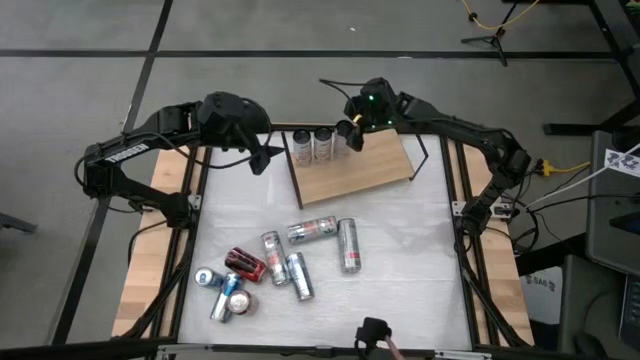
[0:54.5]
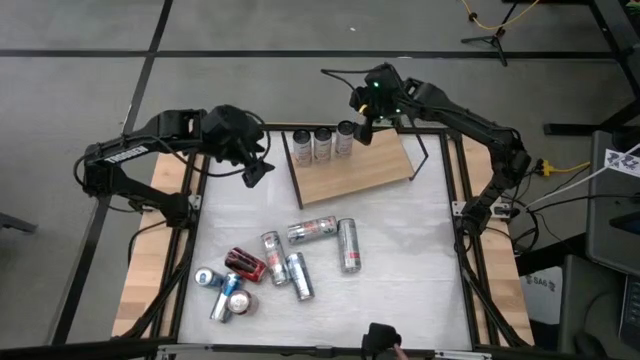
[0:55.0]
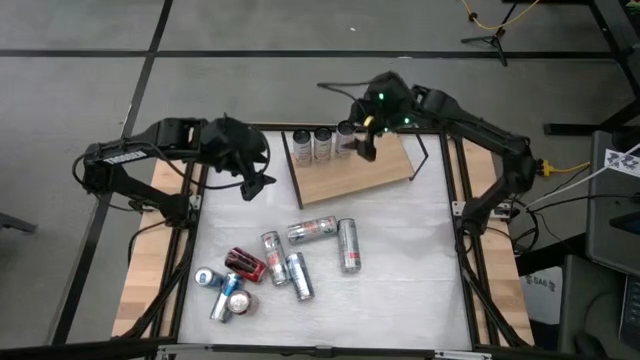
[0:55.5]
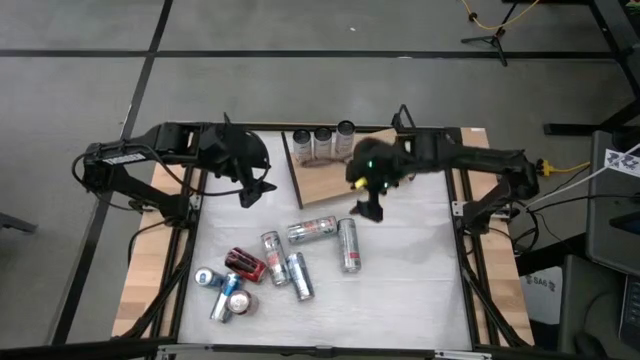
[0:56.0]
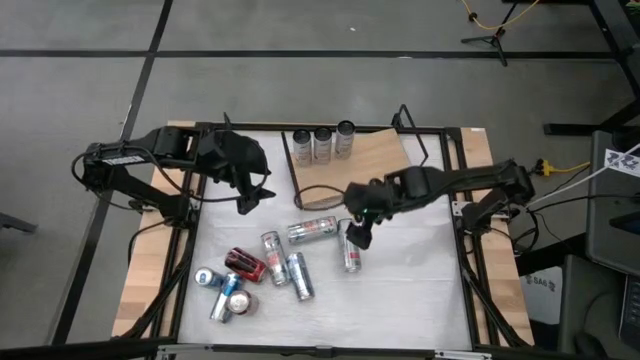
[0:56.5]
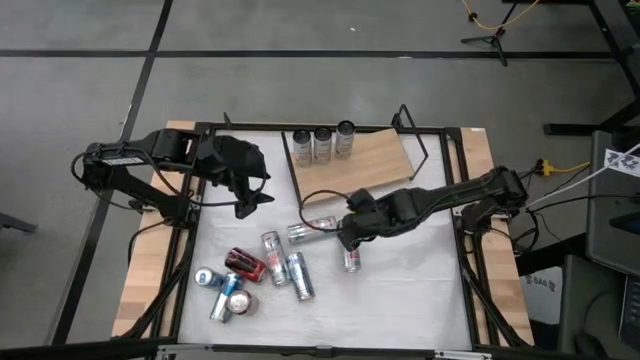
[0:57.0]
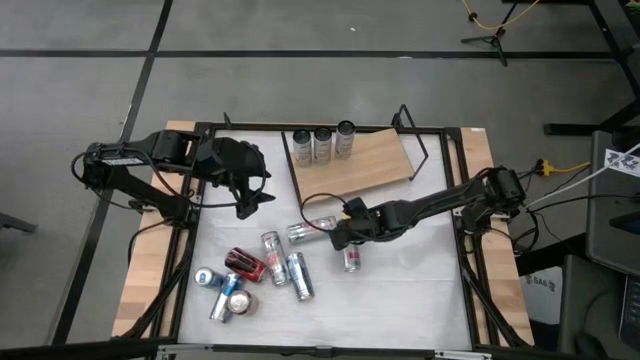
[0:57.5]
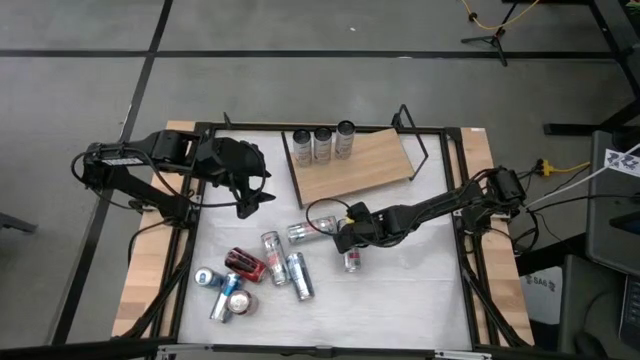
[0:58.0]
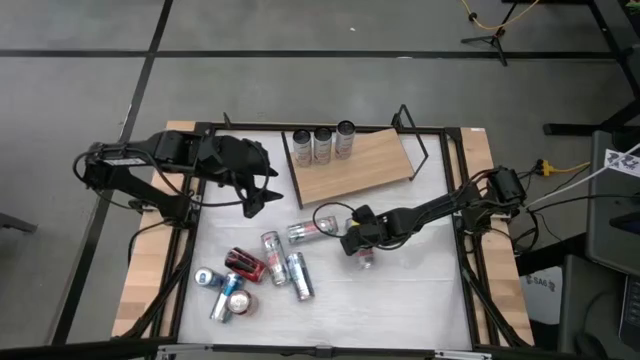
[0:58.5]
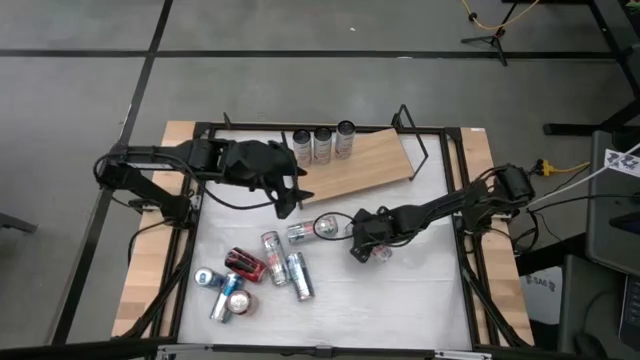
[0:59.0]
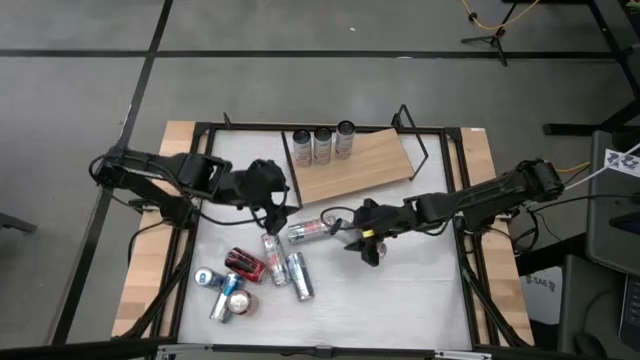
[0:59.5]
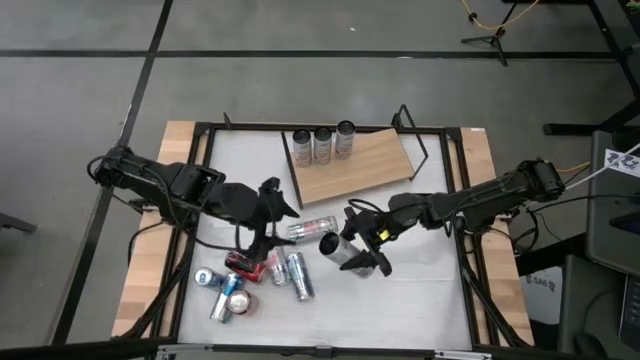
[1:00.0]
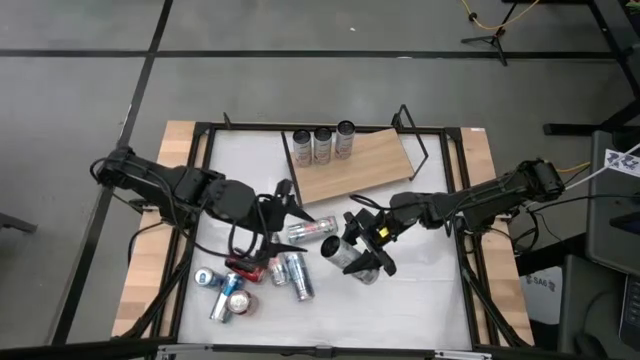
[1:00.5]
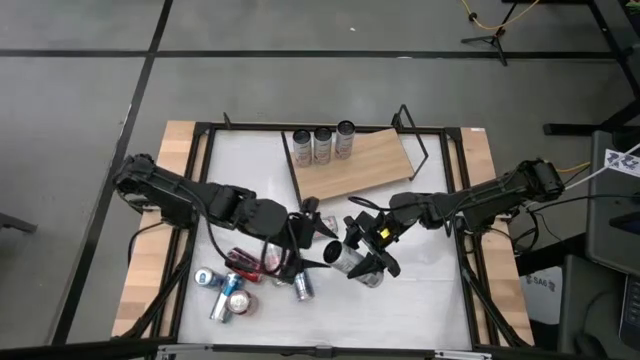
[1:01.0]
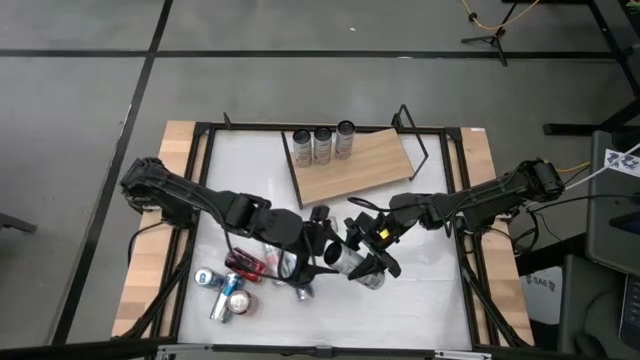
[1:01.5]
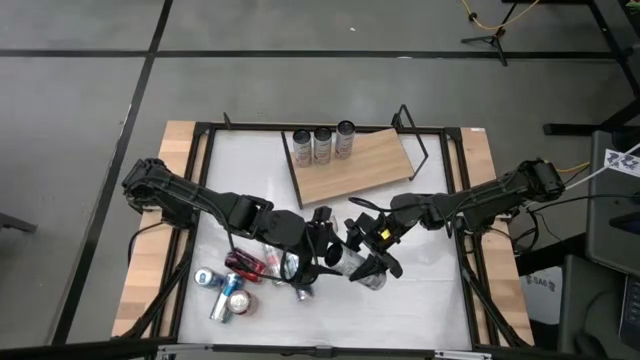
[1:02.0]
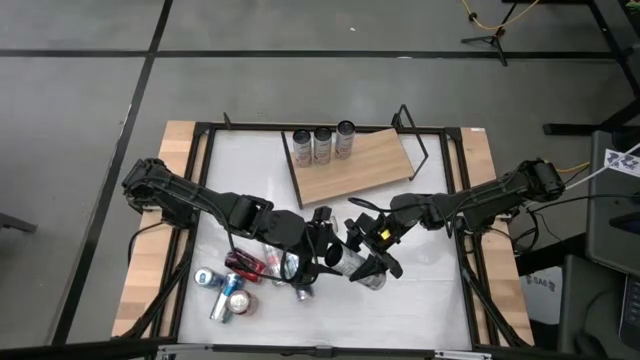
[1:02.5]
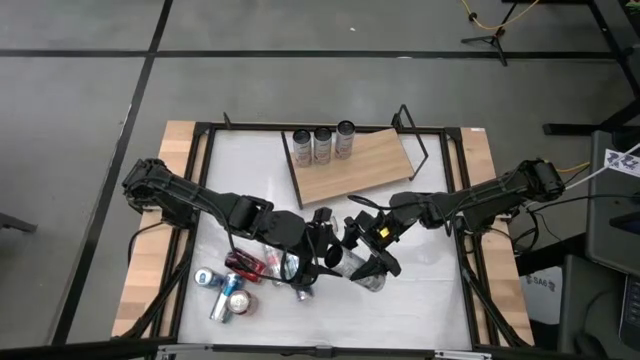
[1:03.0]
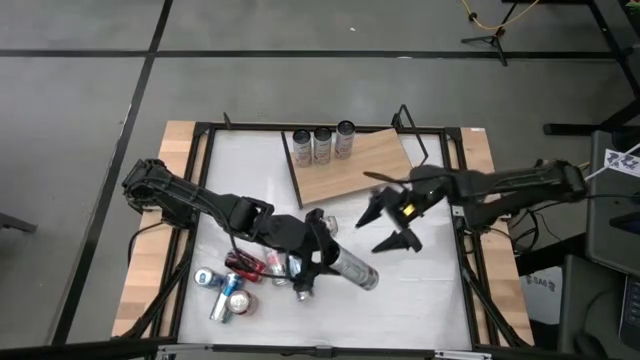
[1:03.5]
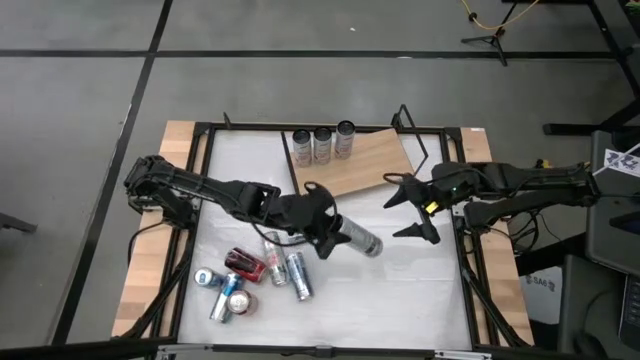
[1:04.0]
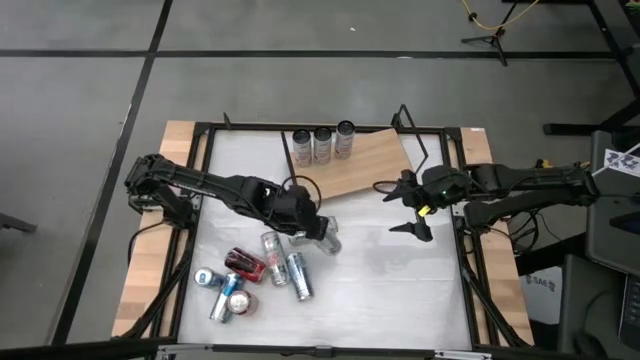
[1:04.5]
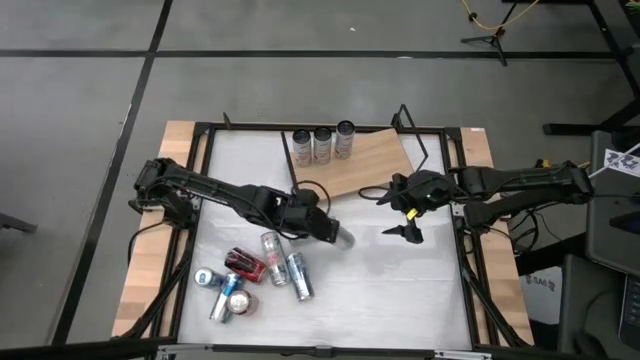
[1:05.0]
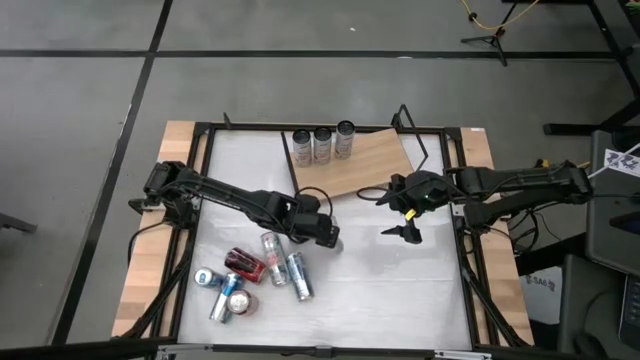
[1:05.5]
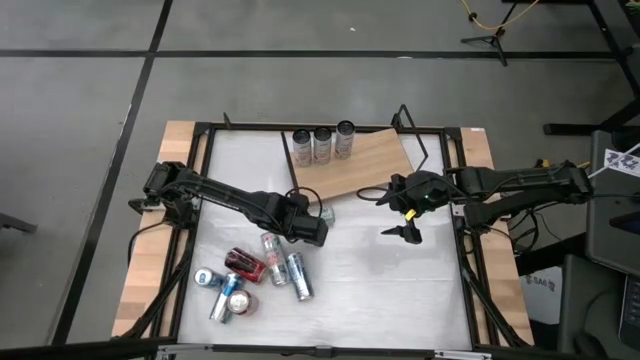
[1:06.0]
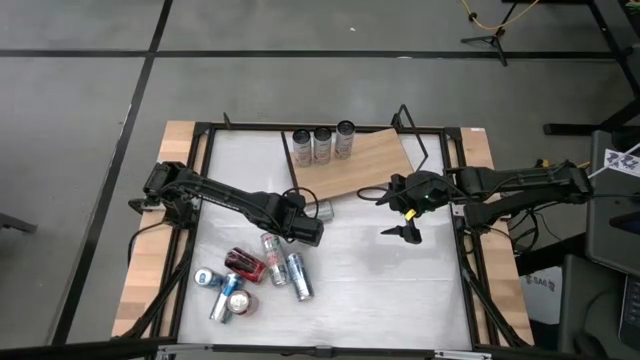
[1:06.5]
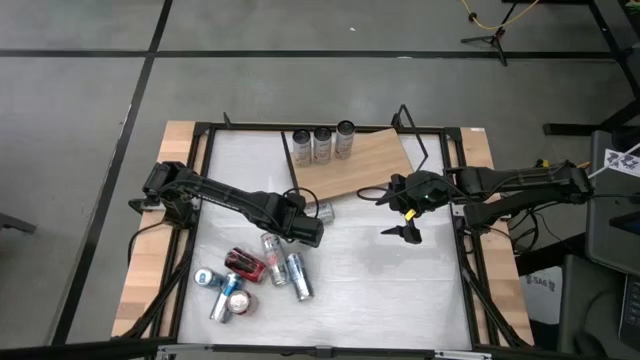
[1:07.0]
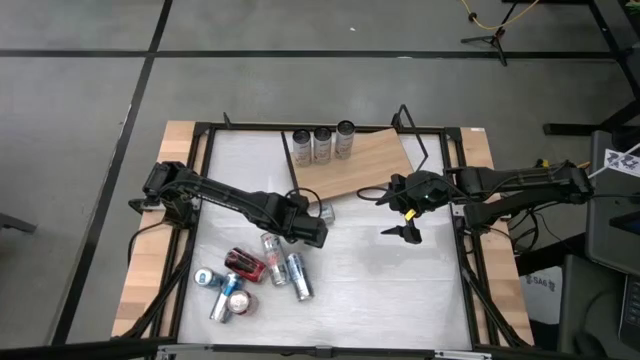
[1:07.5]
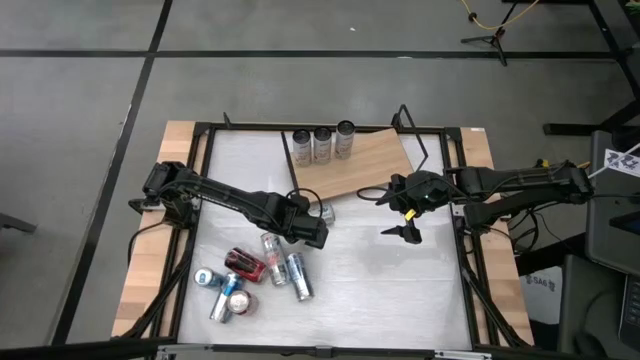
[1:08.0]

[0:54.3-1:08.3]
Task: Place canned beverage on shelf
Put the white pink soda can on the shelf aligned with the other white pink soda can

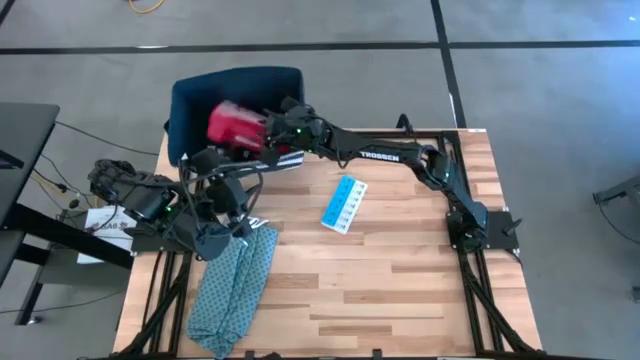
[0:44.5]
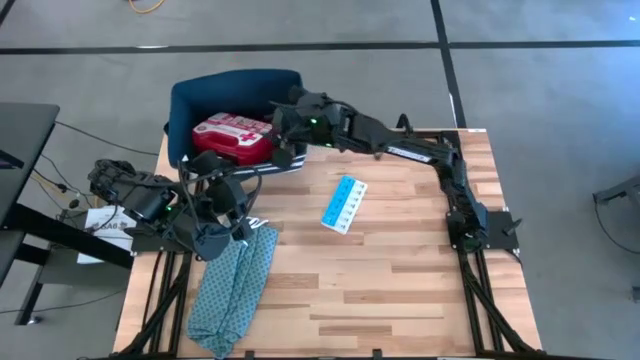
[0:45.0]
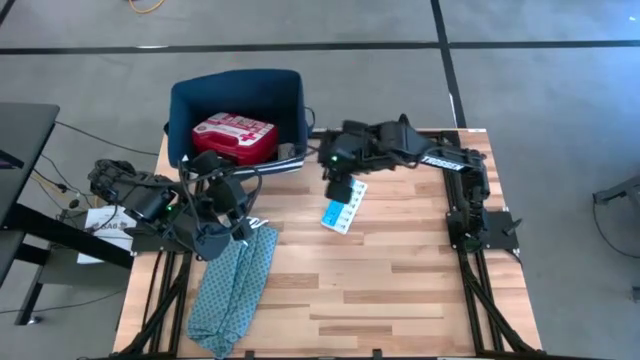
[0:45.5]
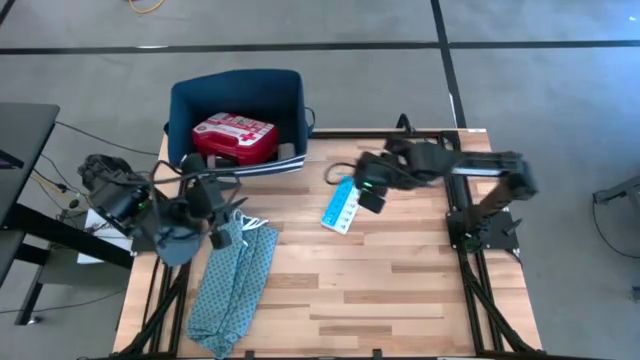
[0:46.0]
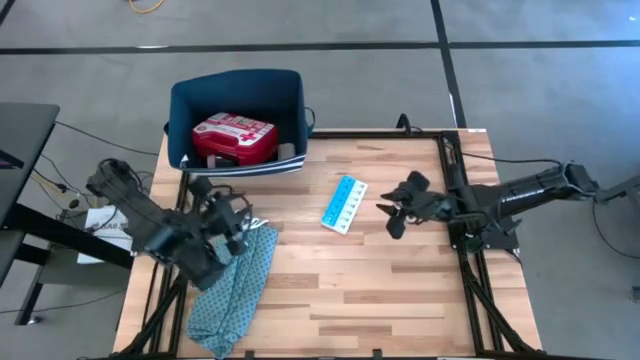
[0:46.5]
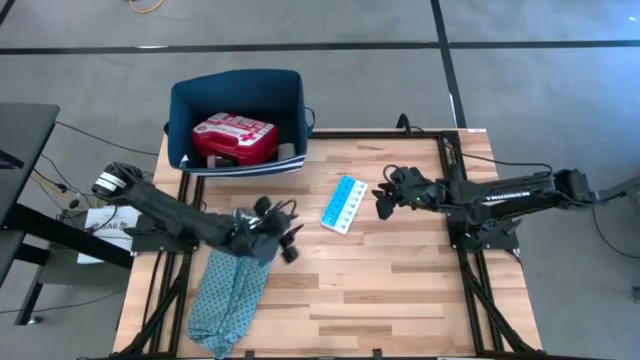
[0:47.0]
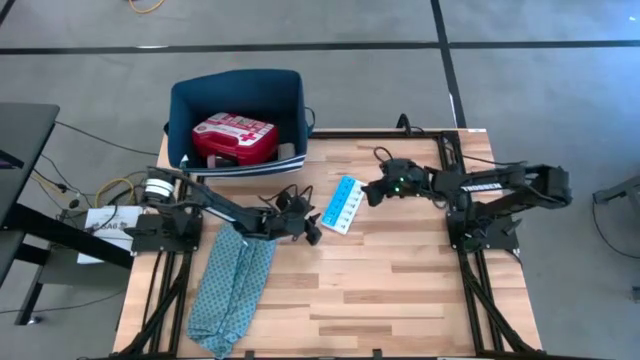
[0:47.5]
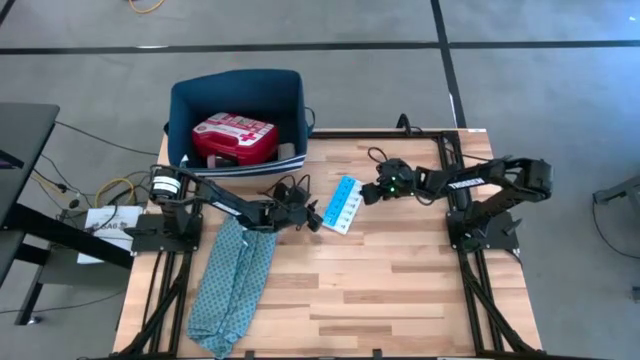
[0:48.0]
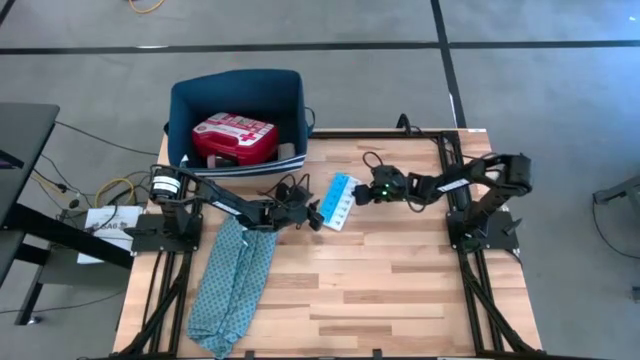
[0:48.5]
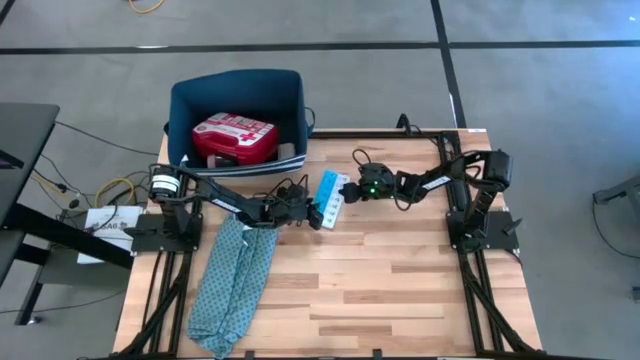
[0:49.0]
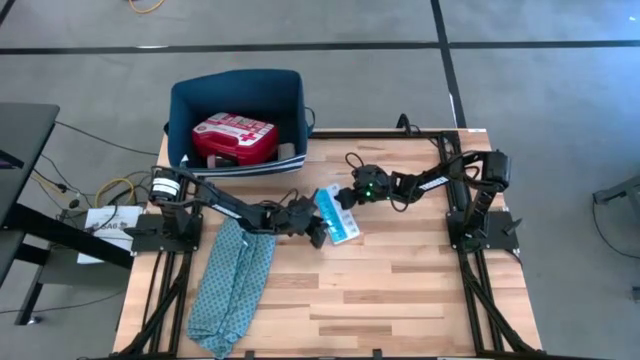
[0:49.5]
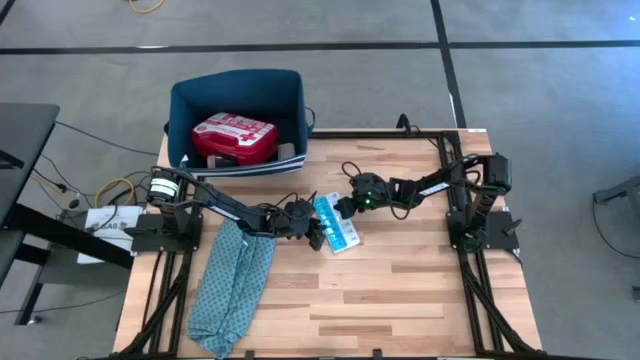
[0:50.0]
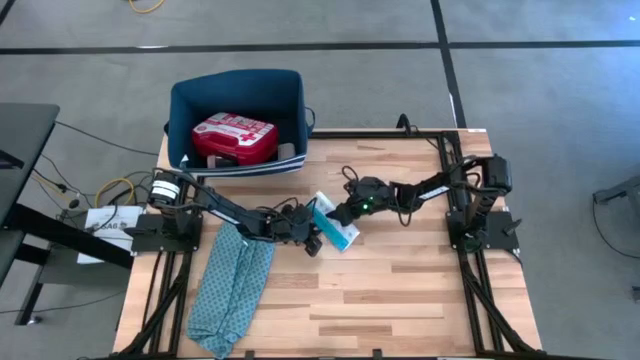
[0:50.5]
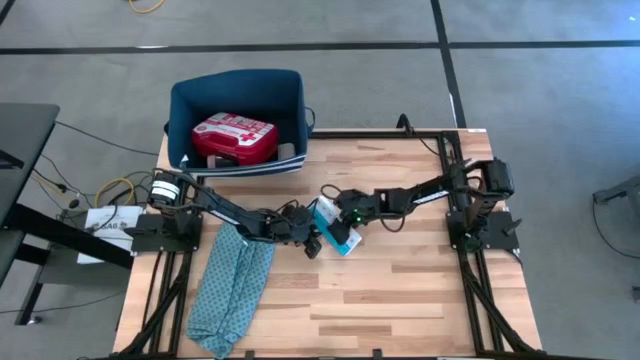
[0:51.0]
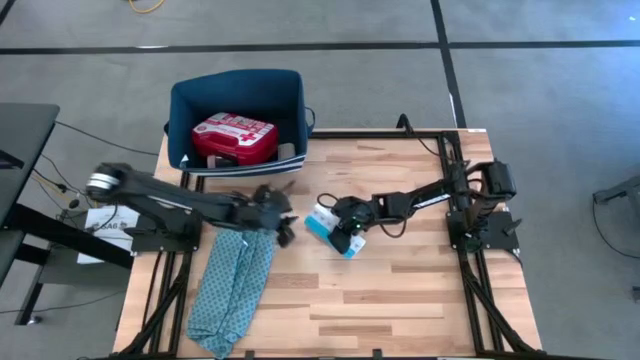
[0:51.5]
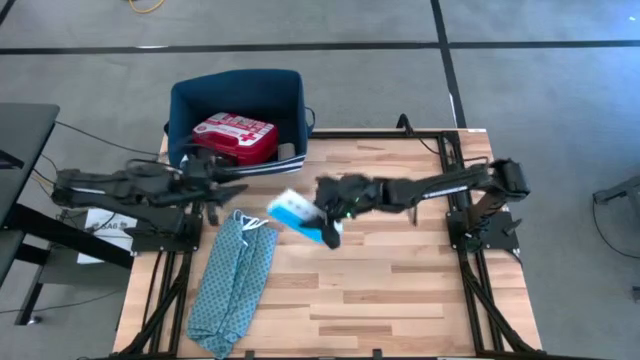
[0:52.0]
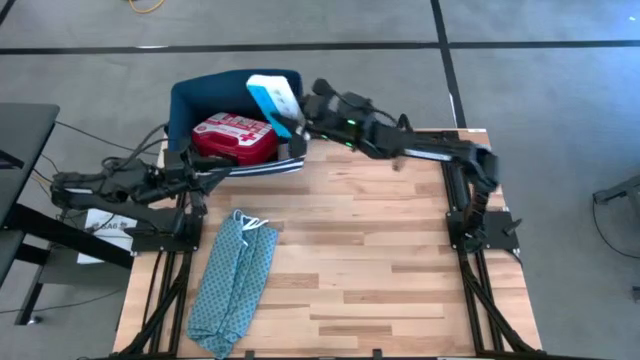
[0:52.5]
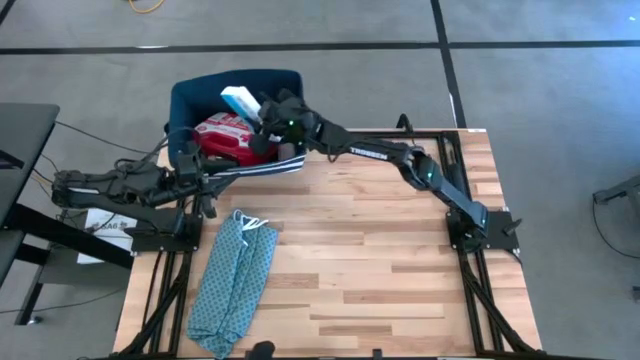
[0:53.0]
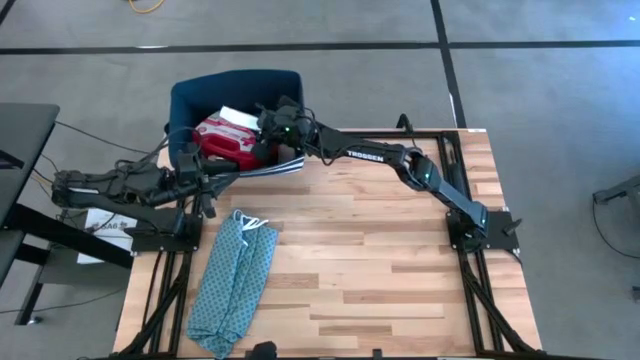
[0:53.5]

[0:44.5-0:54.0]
Task: Pick & place medical supplies in basket/bin
Put the blue and white pill organizer into the blue bin
